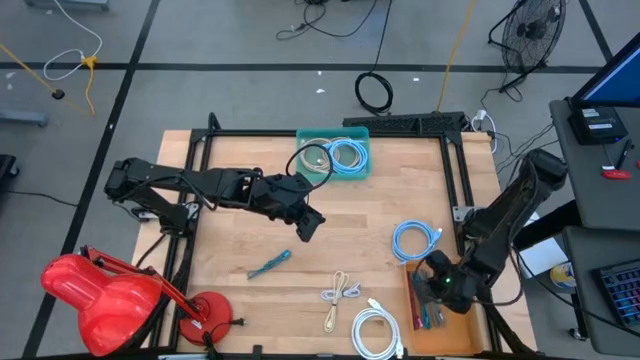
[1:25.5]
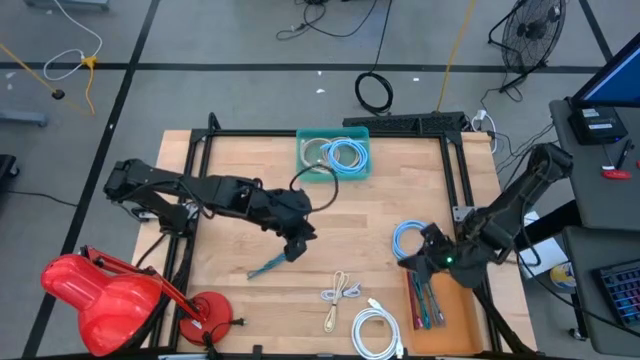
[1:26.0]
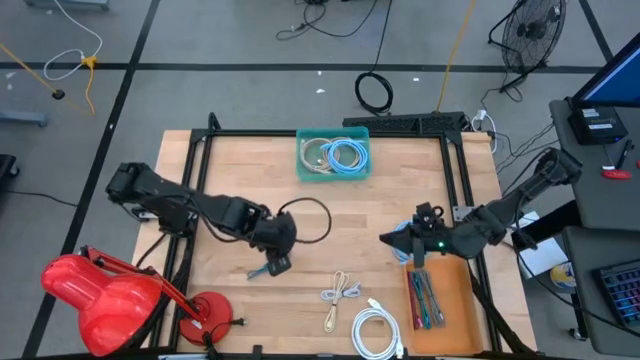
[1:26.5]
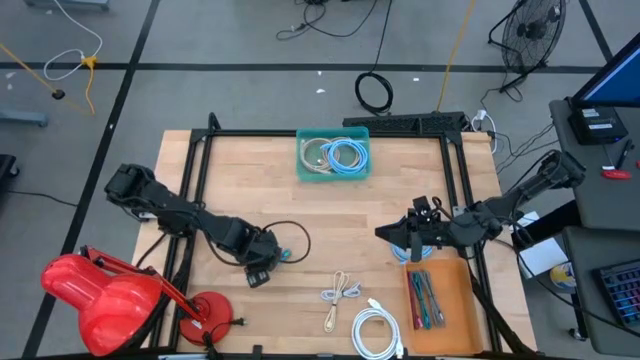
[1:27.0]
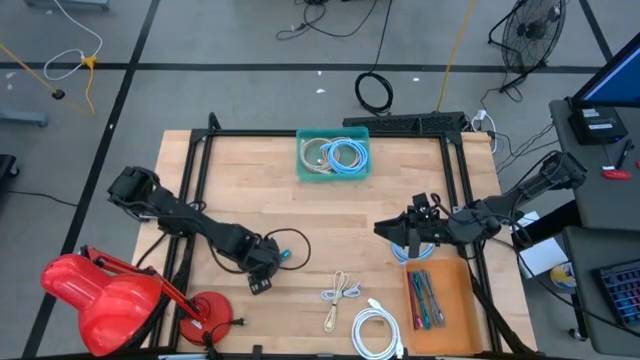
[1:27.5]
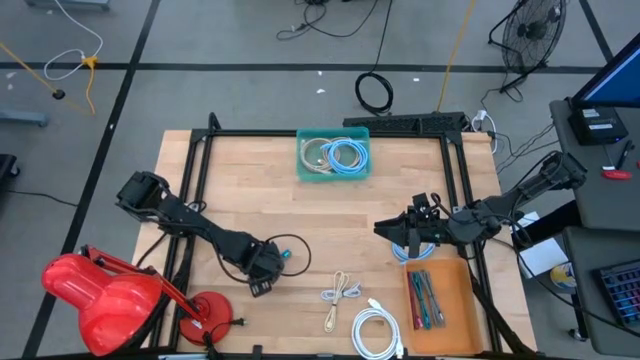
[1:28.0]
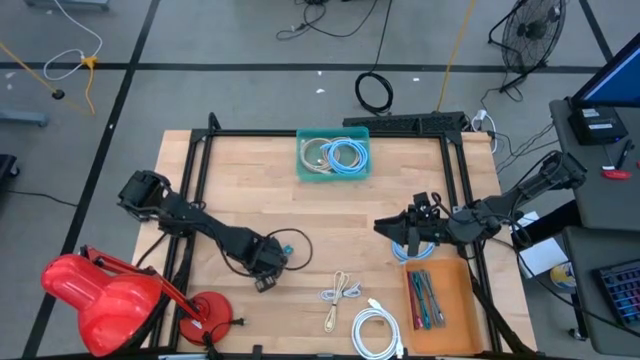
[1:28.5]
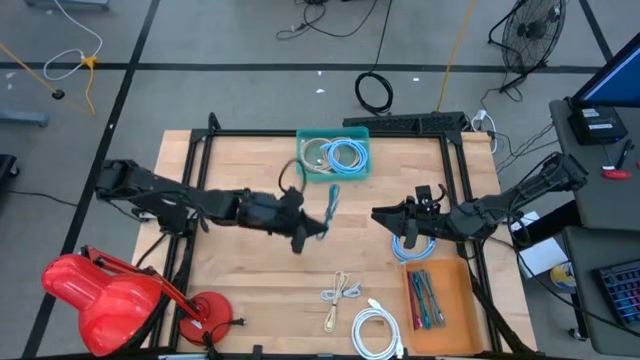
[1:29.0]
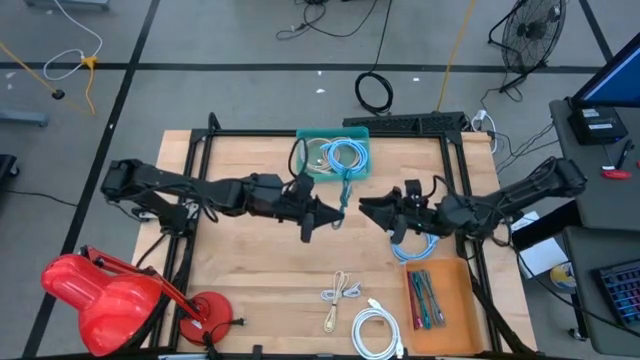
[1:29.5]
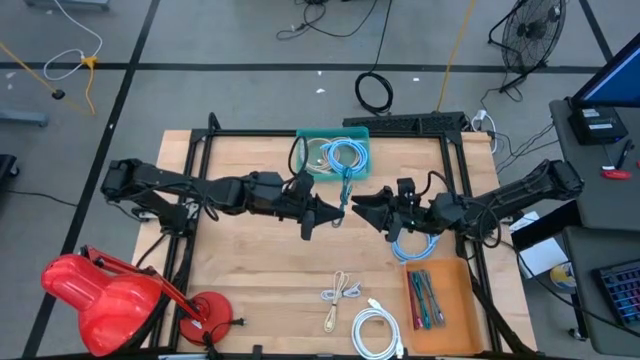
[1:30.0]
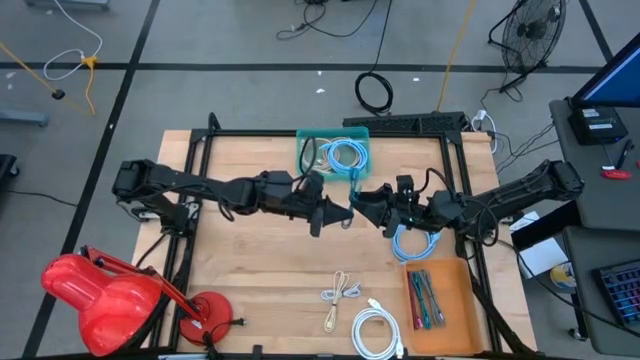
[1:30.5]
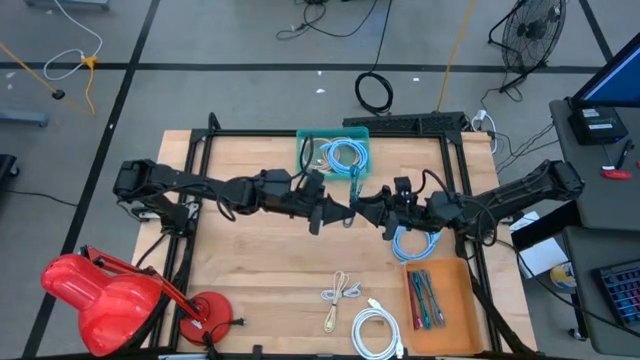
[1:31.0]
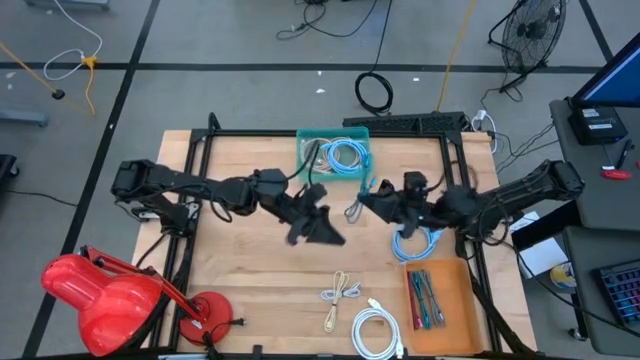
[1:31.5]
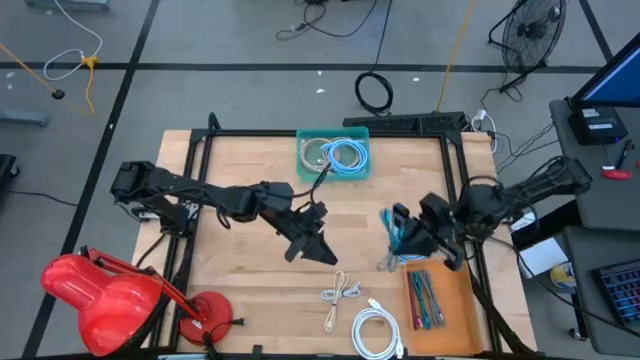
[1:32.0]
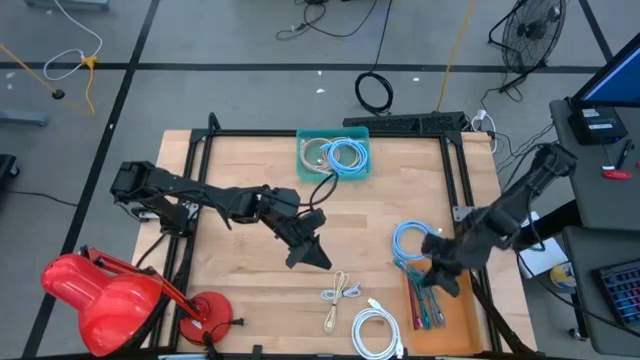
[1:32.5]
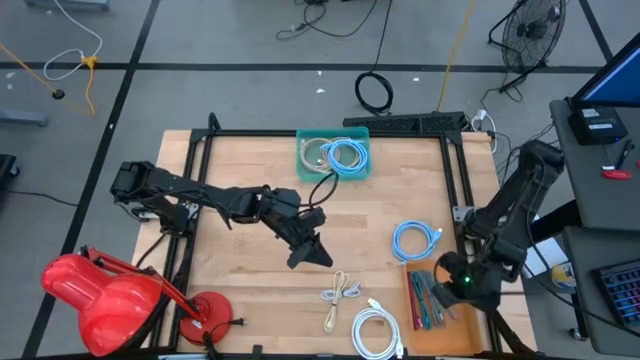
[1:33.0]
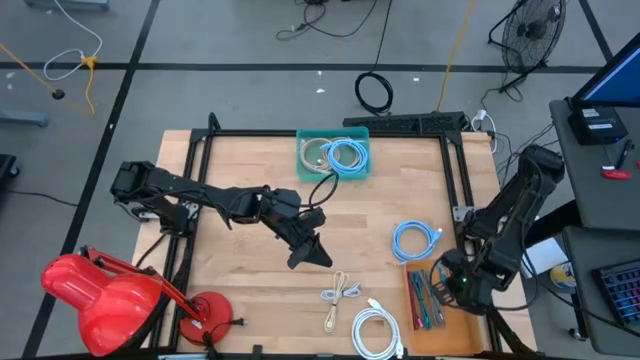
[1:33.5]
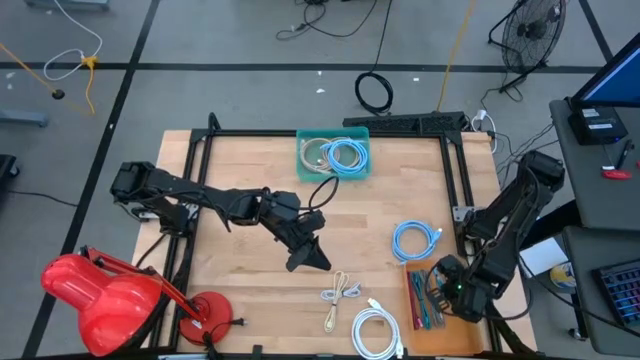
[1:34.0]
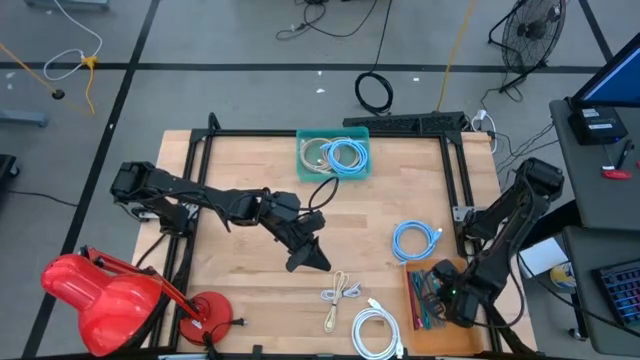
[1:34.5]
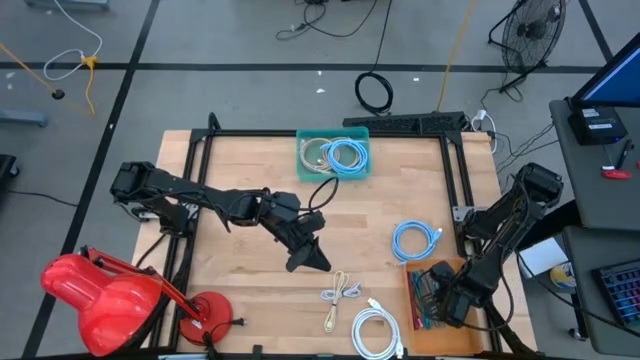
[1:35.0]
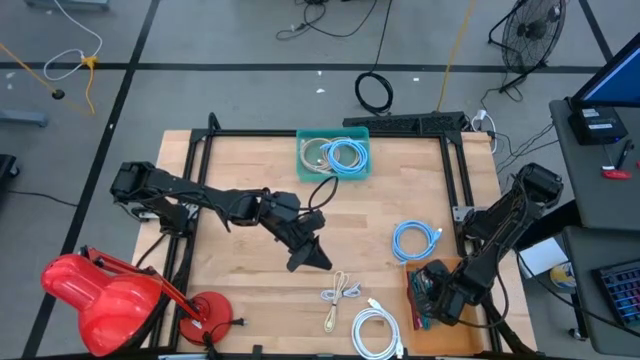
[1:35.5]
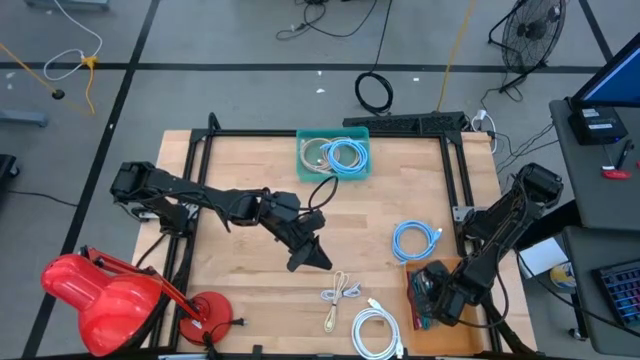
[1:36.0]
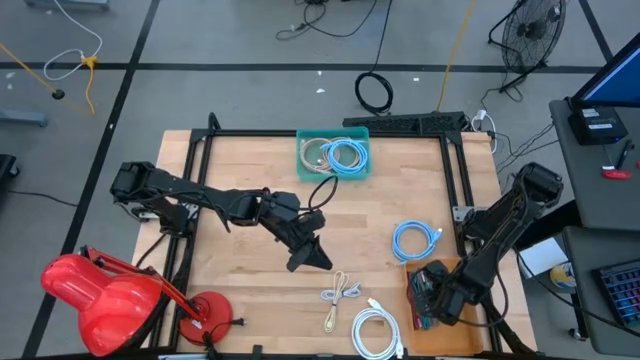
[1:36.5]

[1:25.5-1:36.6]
Task: Pick & Place USB Port
Put the blue charger cable into the orange bin

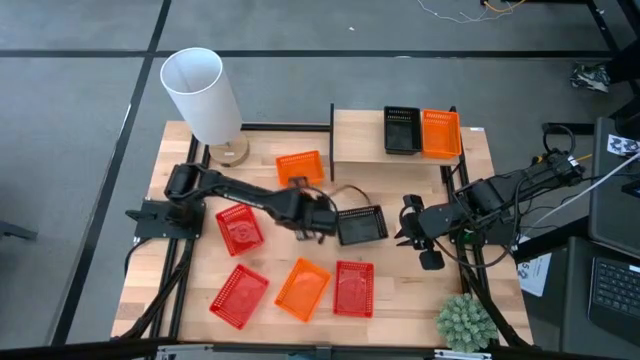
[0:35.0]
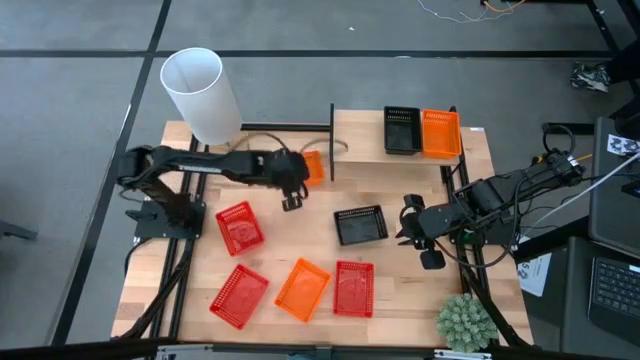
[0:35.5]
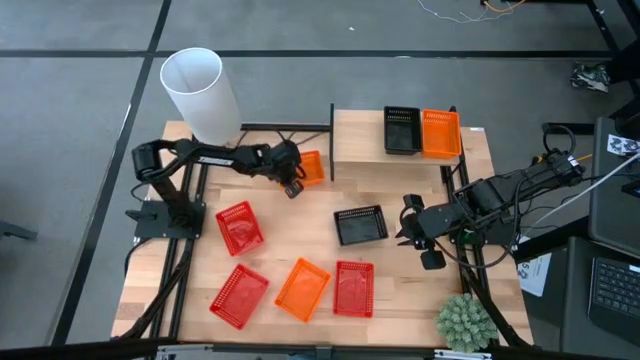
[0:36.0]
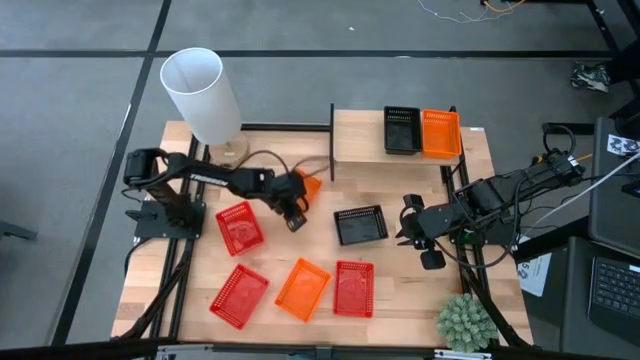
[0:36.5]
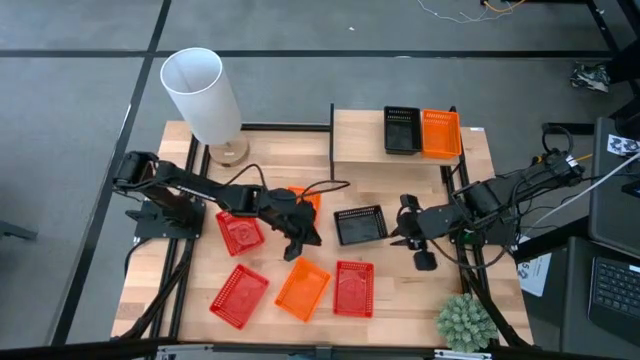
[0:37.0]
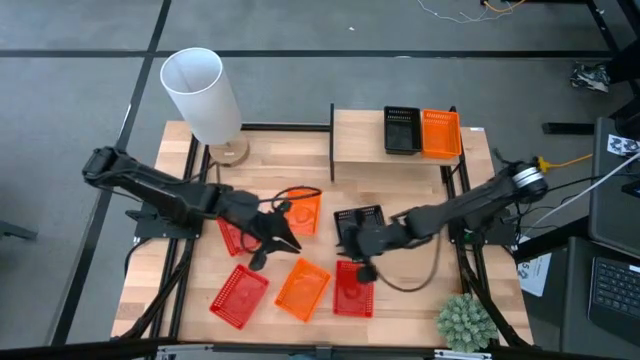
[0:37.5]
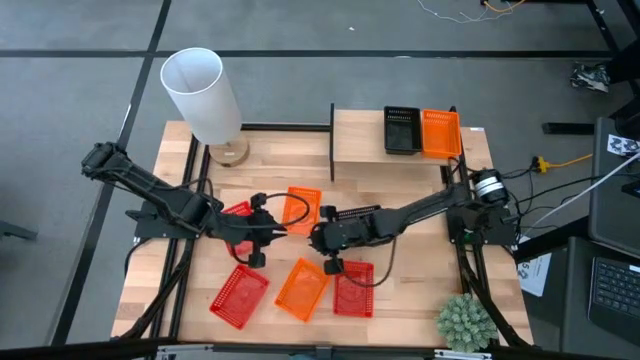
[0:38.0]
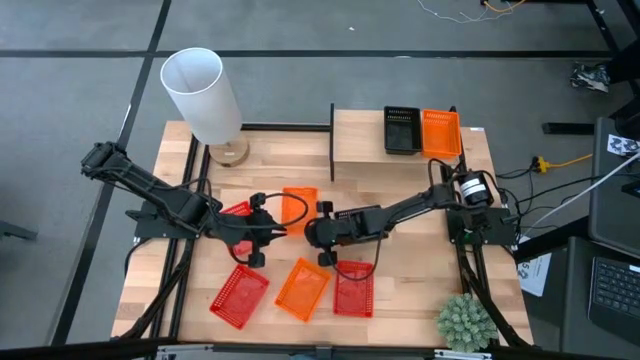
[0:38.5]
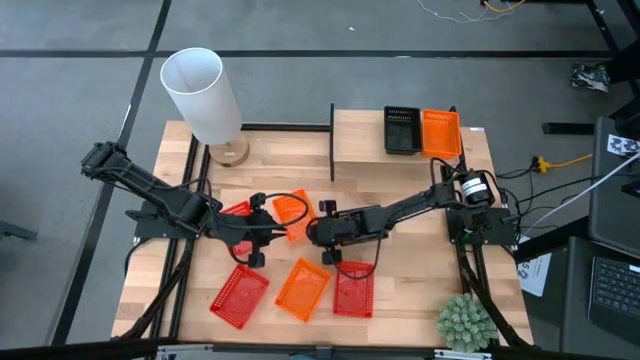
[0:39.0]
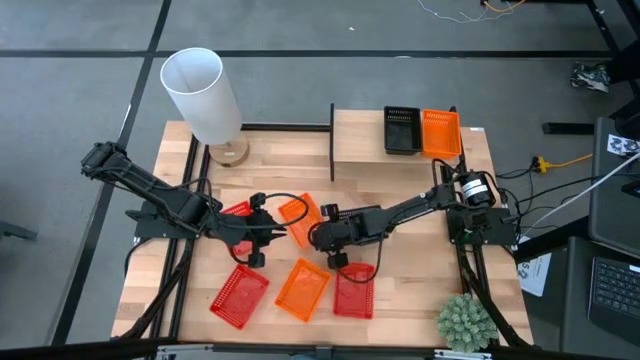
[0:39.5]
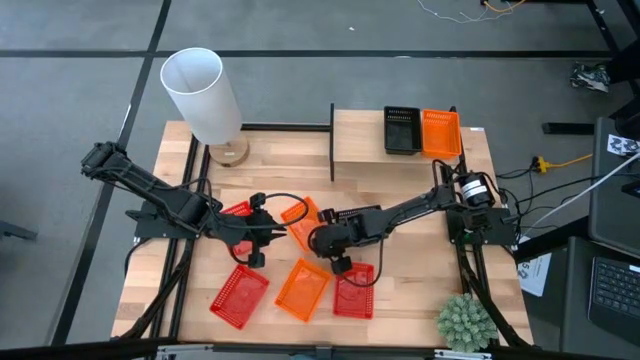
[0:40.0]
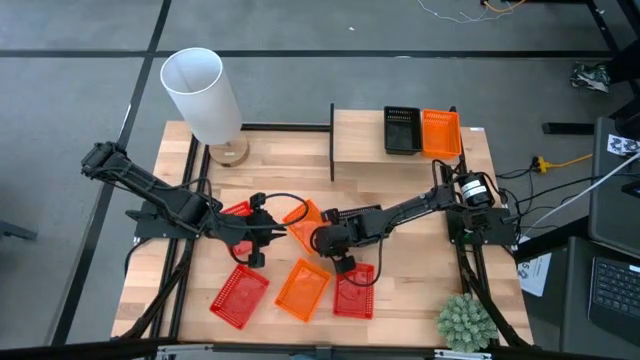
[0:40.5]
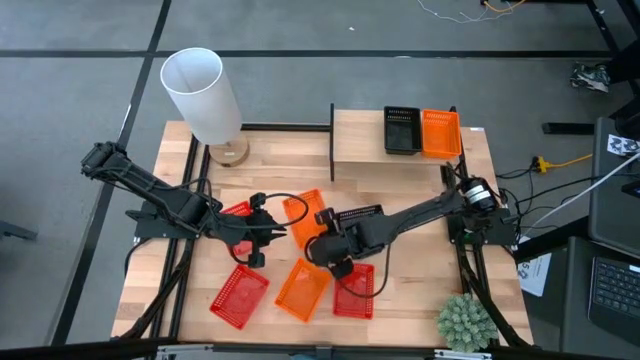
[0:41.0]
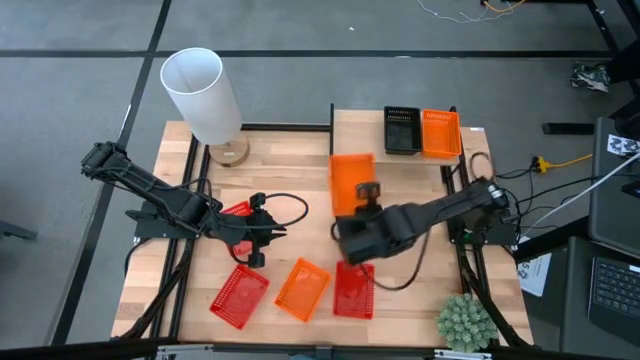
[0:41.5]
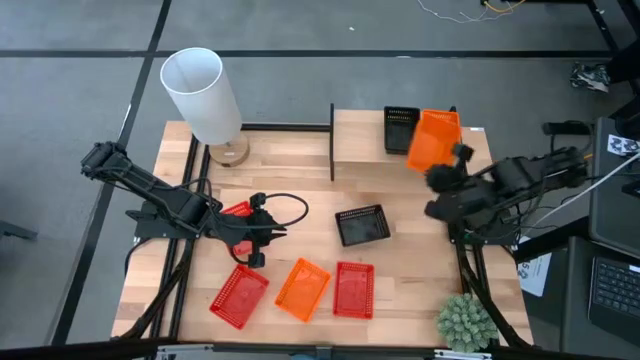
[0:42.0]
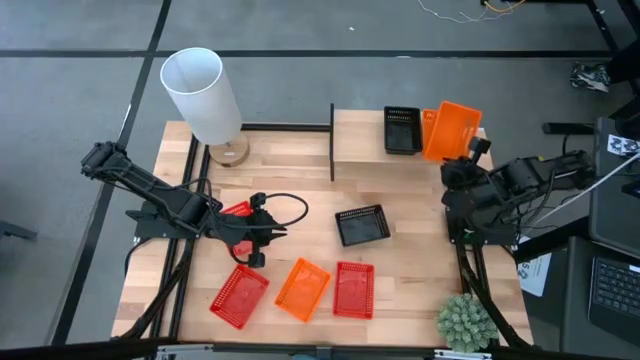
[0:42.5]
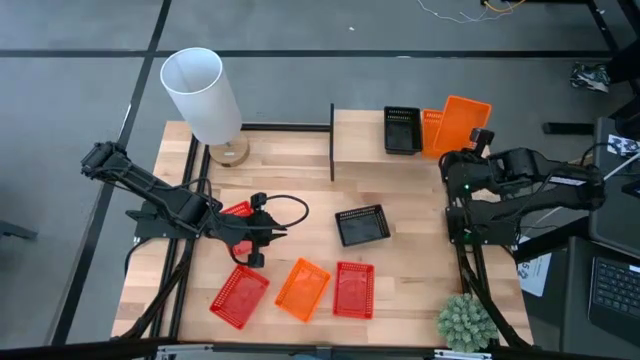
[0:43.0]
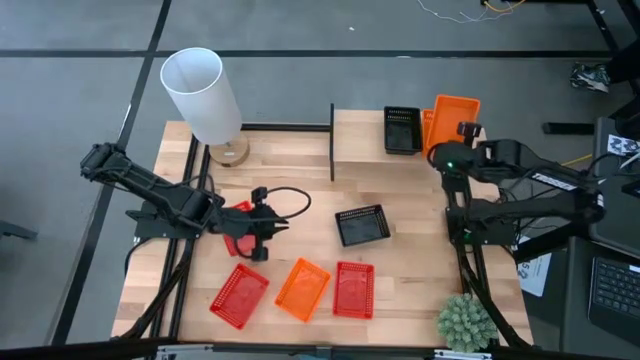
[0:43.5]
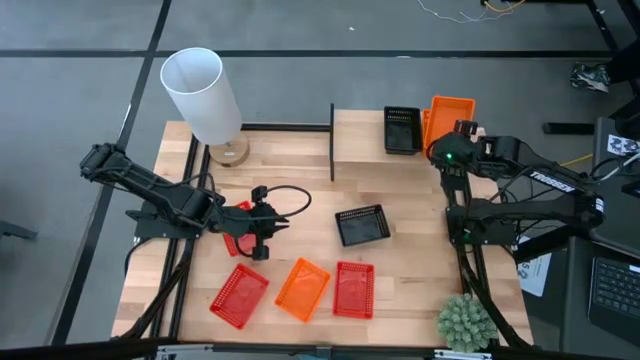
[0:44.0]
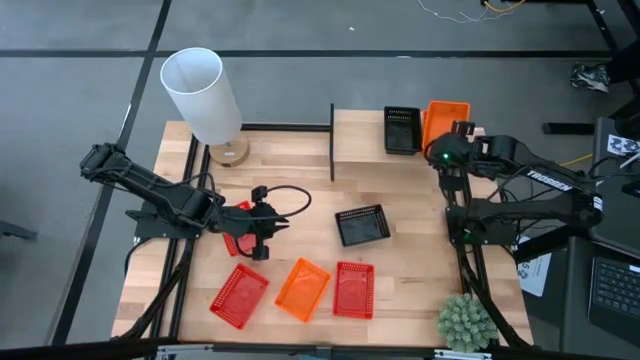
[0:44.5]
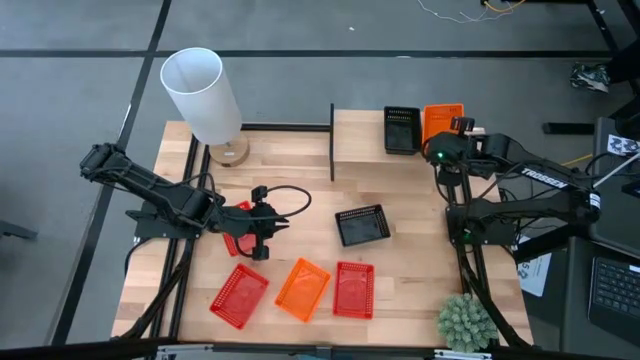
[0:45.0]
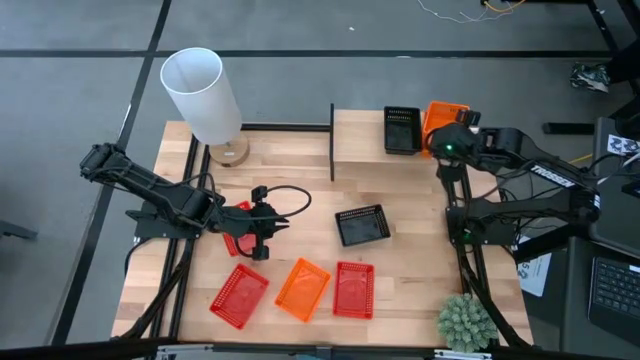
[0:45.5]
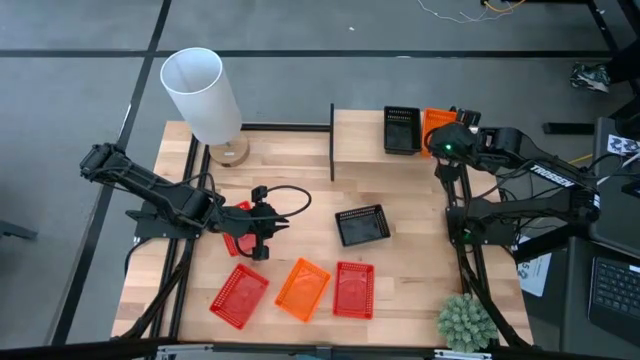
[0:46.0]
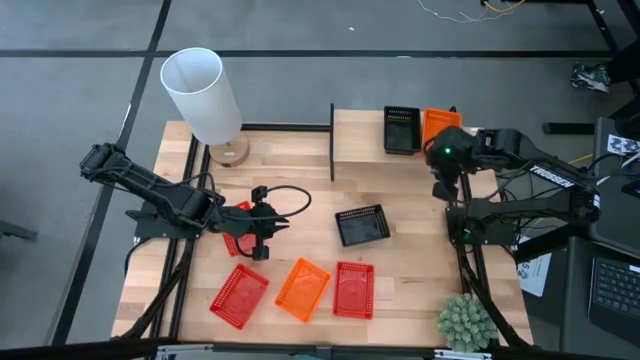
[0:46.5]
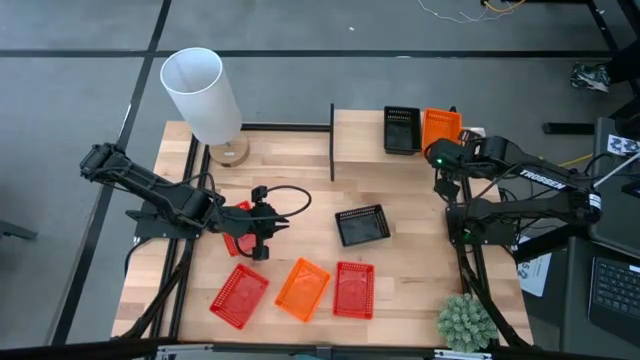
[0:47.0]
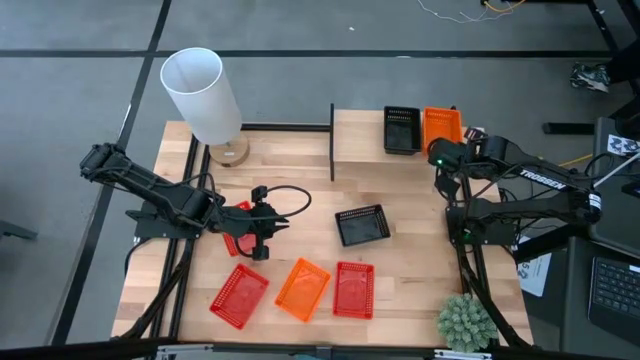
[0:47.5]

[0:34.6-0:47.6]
Task: Stack baskets on shelf by color
Stack the top orange basket on top of the orange basket on the shelf
